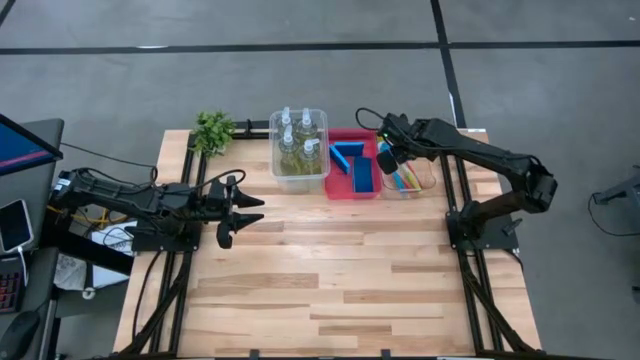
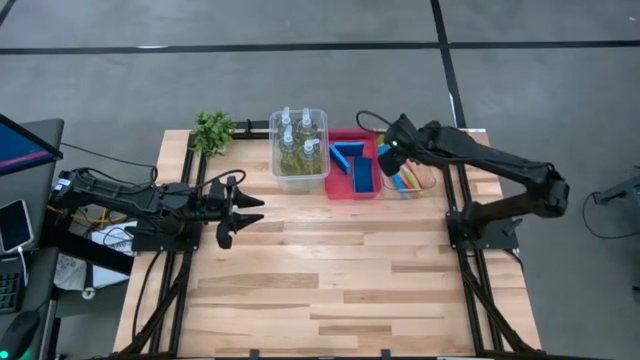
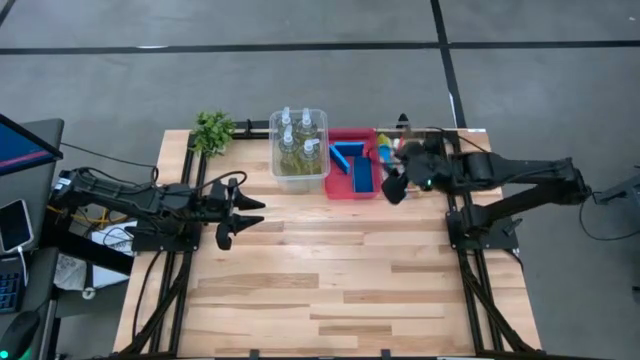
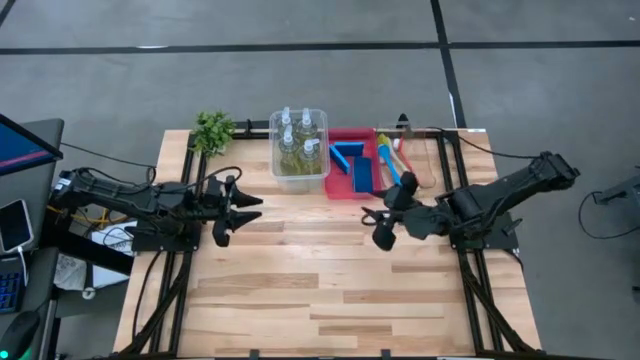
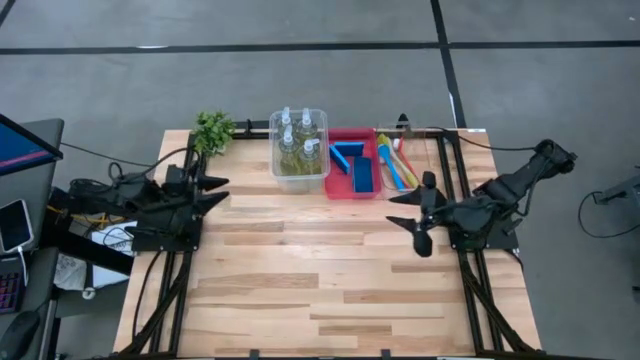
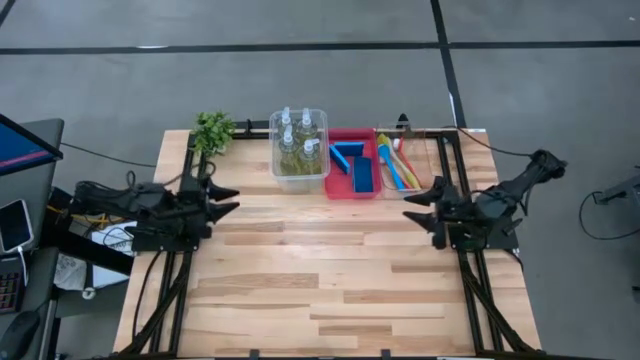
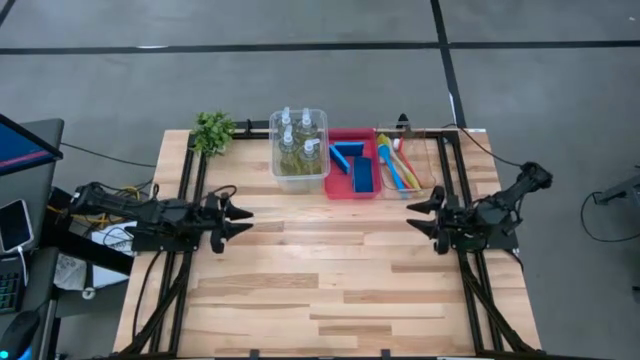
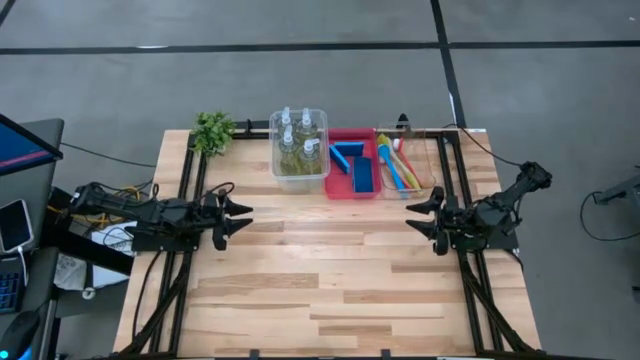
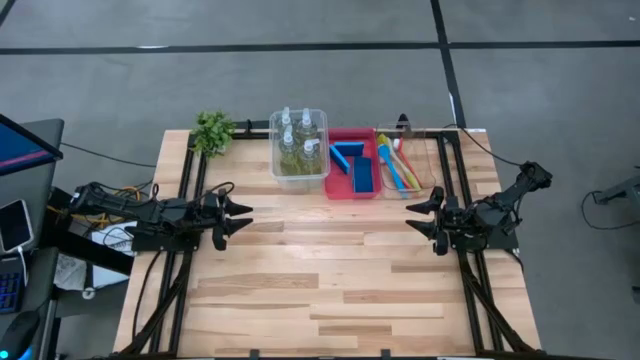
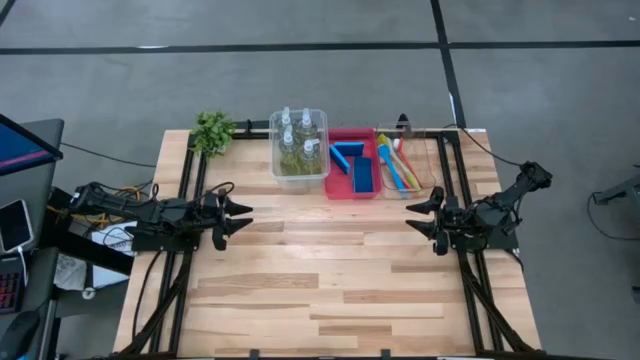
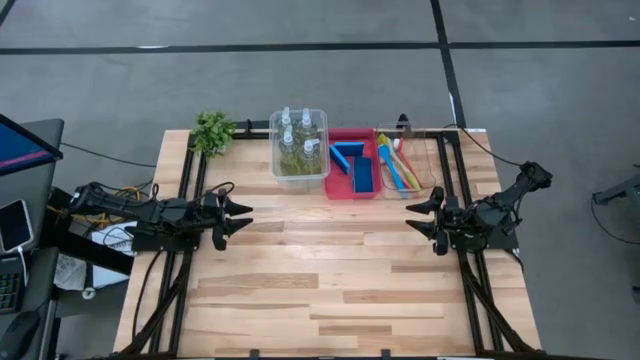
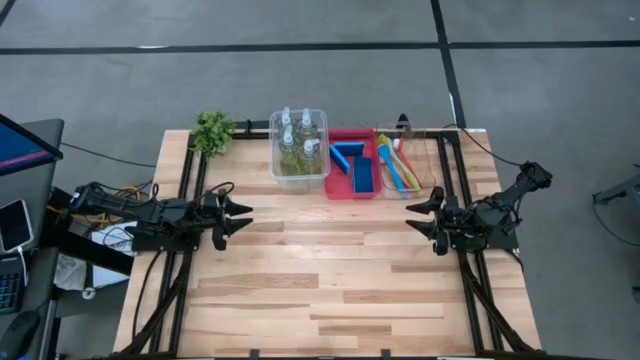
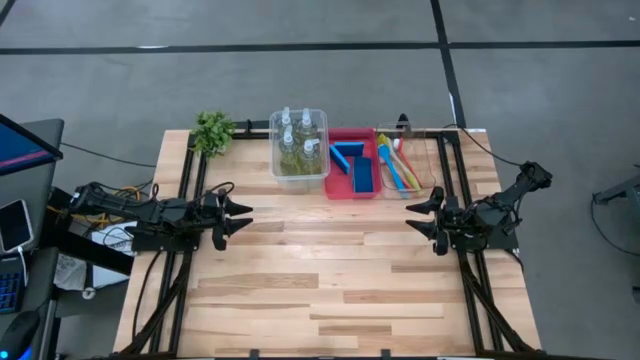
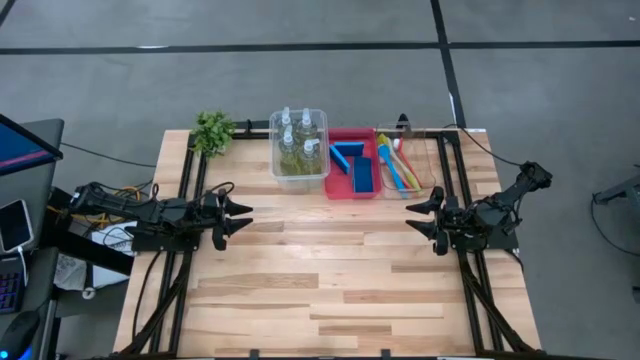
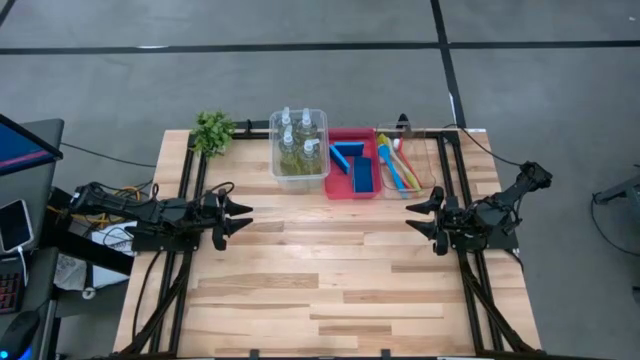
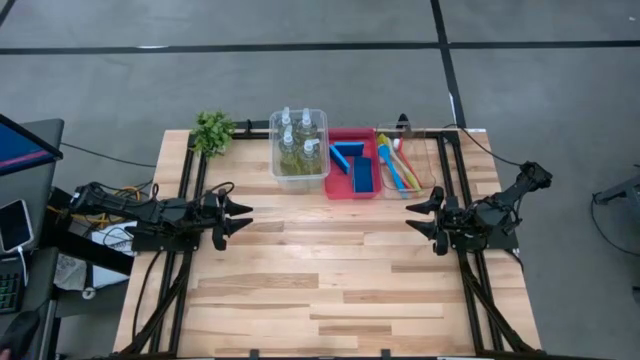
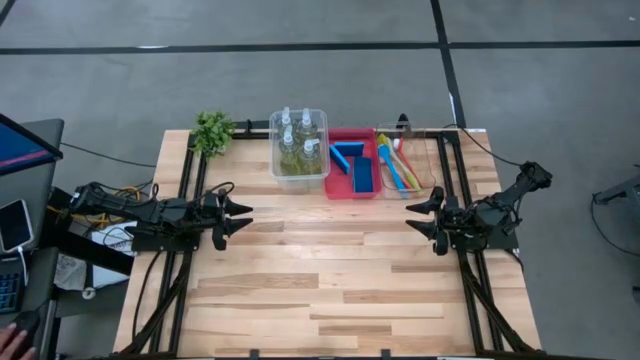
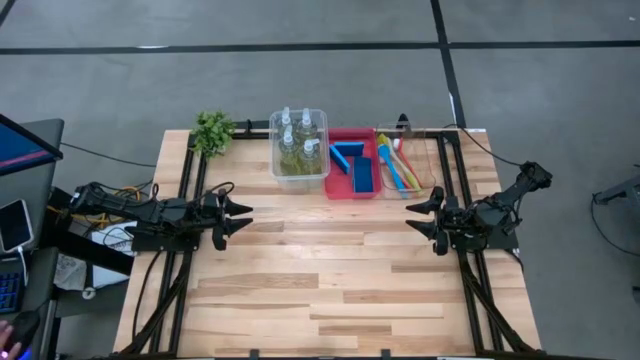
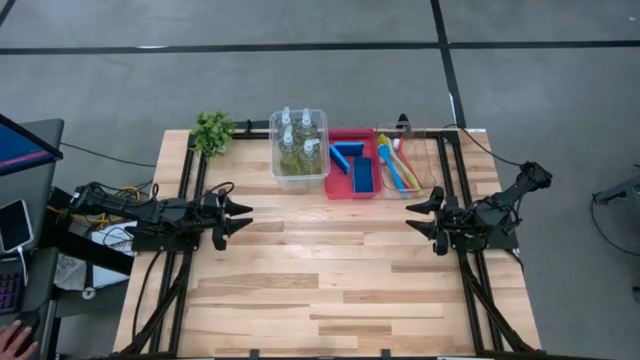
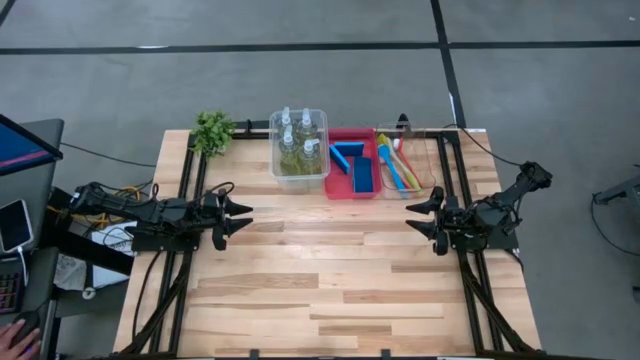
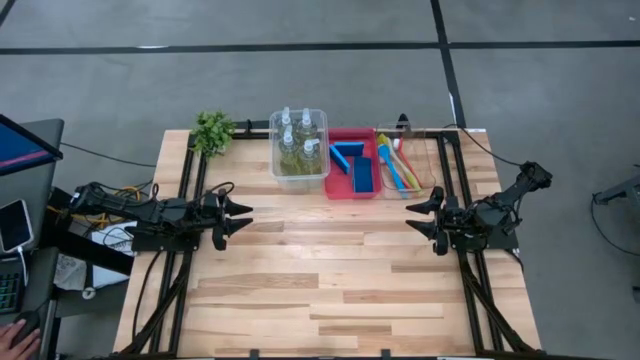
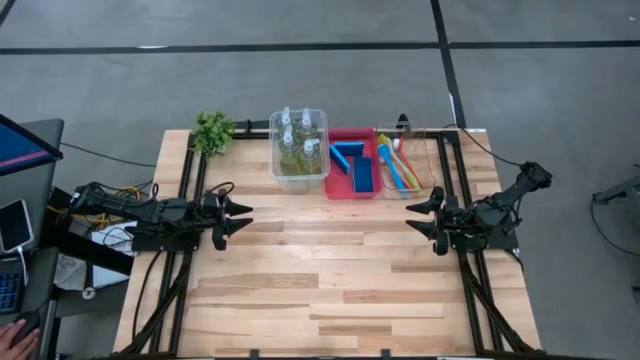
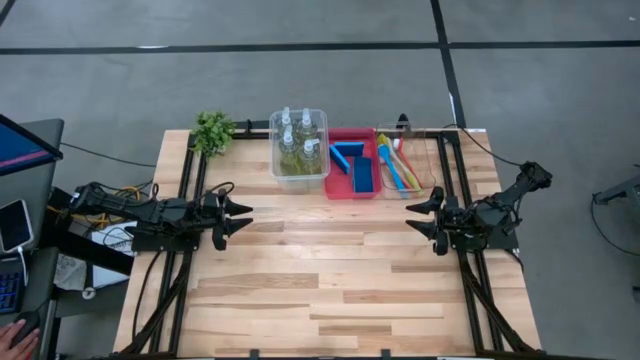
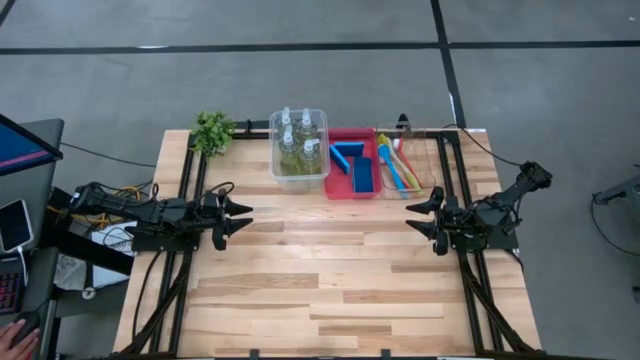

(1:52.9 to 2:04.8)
Task: Pick & Place Kitchen Sink Supplies
Return to Home Position
